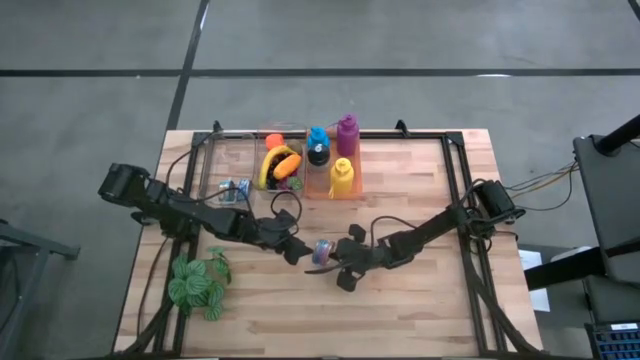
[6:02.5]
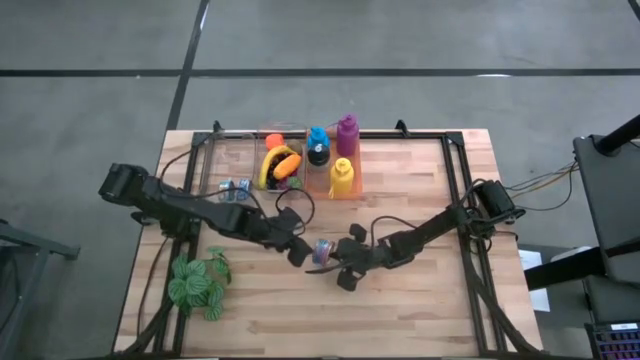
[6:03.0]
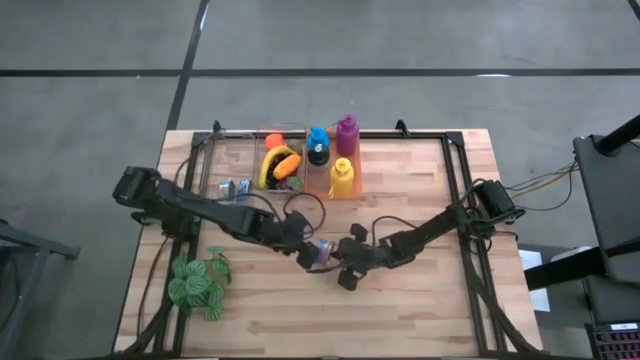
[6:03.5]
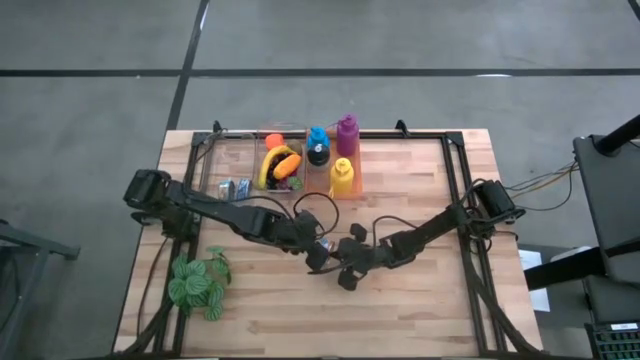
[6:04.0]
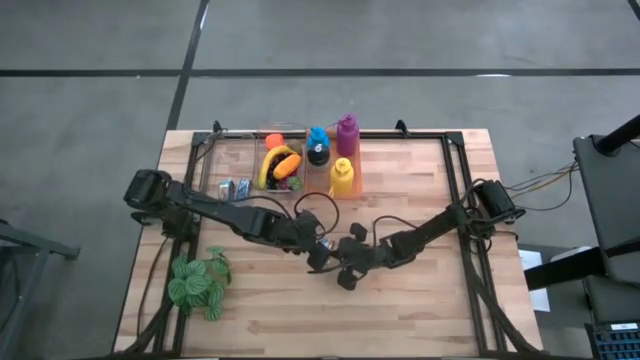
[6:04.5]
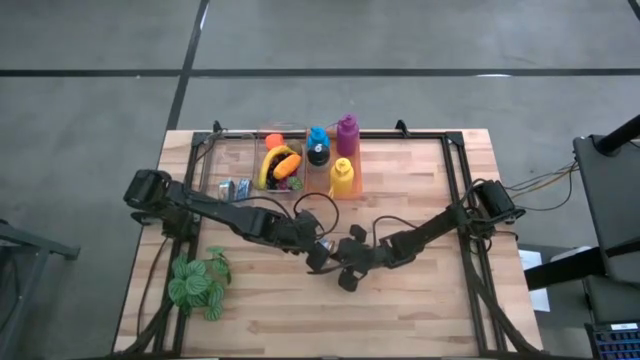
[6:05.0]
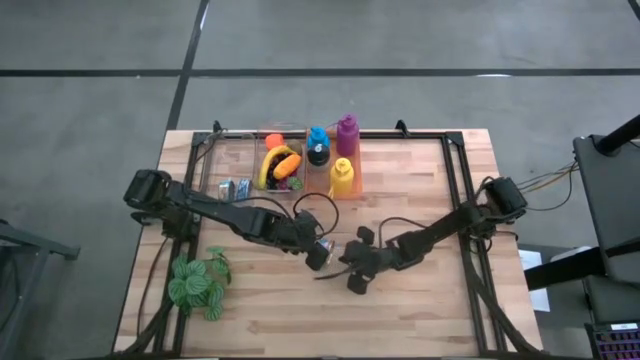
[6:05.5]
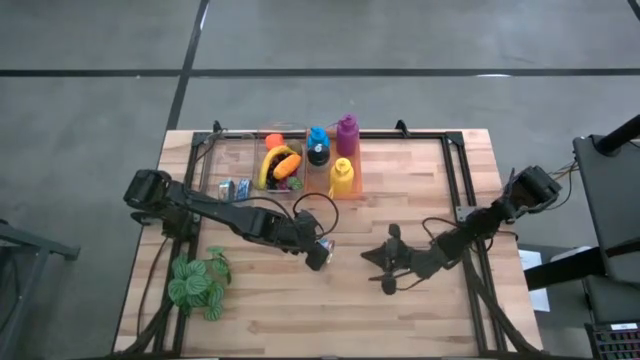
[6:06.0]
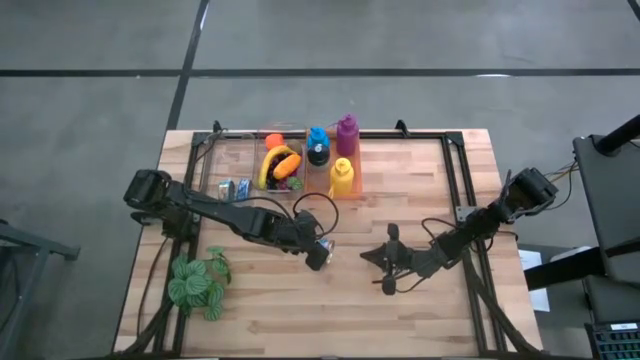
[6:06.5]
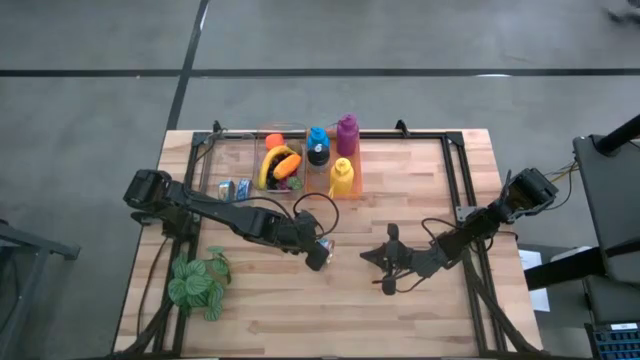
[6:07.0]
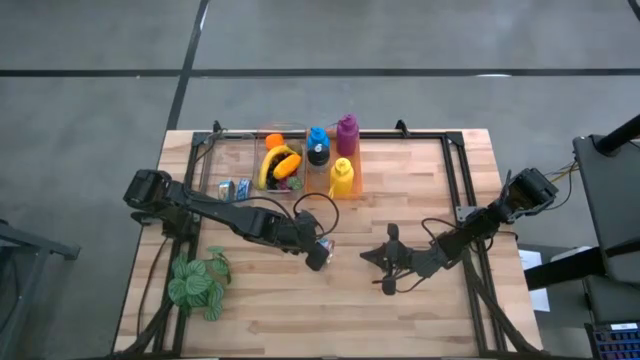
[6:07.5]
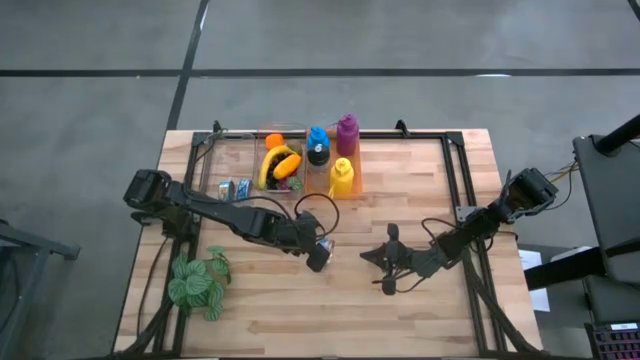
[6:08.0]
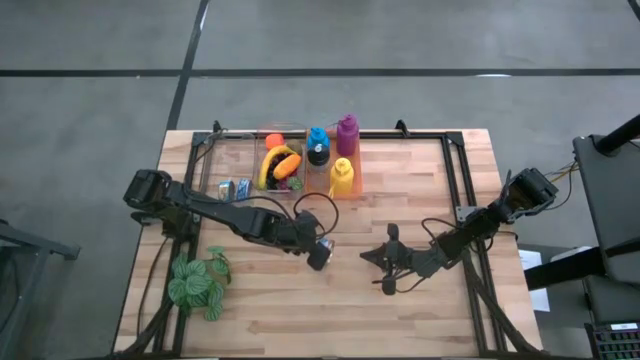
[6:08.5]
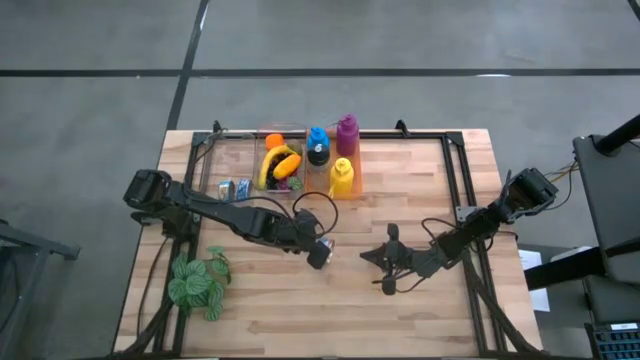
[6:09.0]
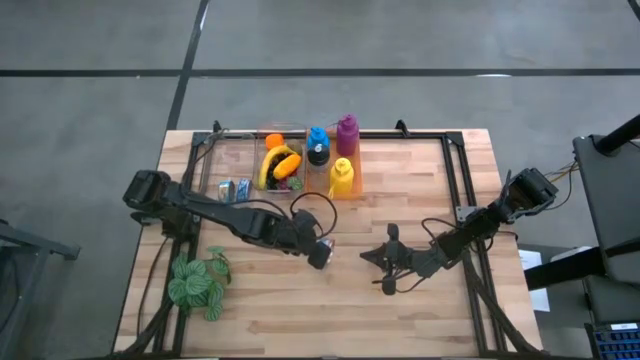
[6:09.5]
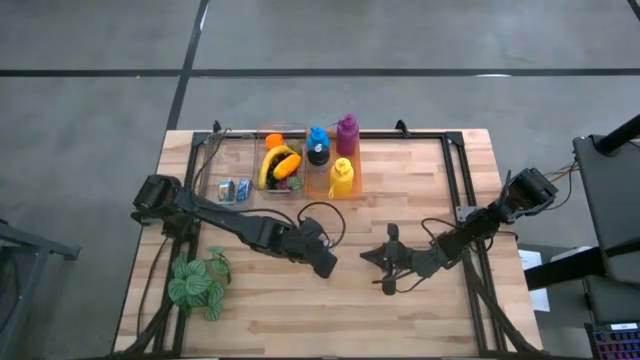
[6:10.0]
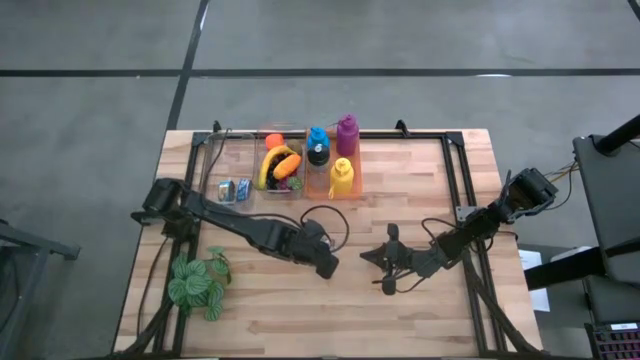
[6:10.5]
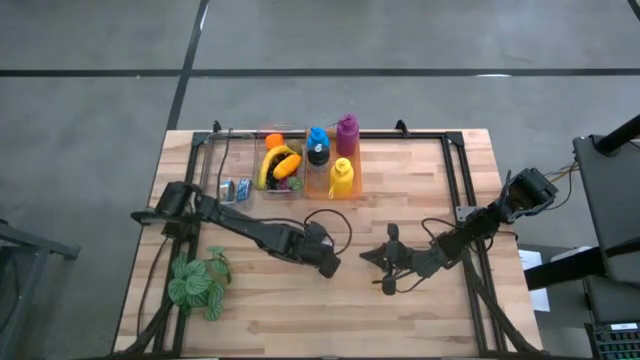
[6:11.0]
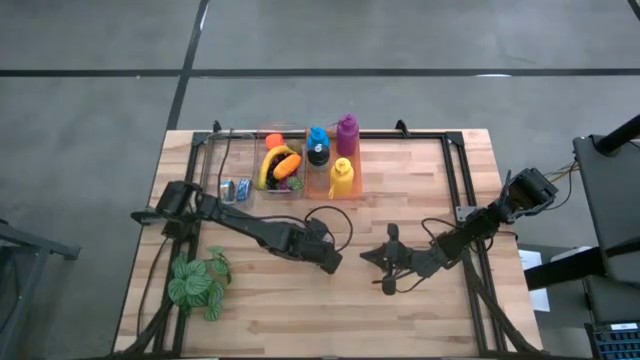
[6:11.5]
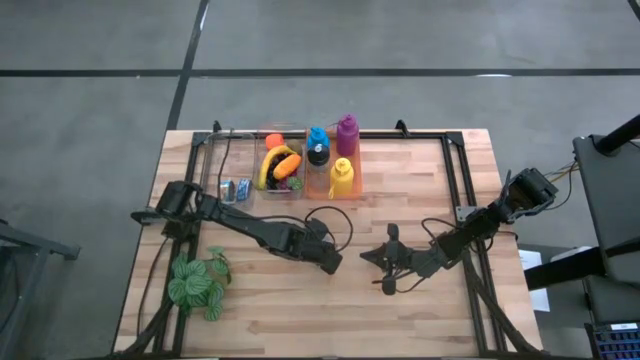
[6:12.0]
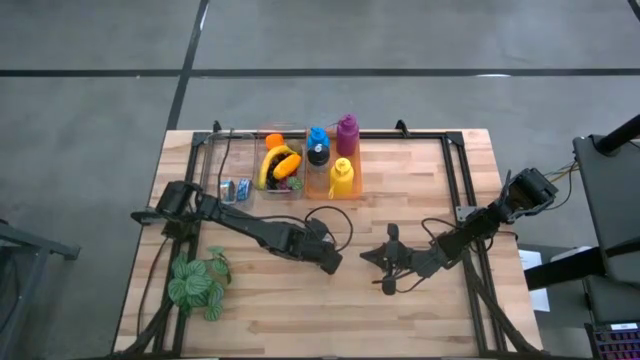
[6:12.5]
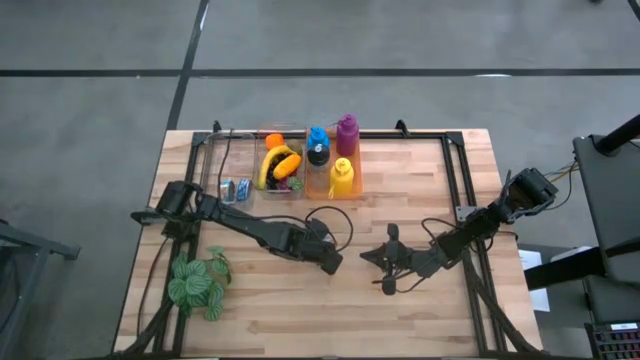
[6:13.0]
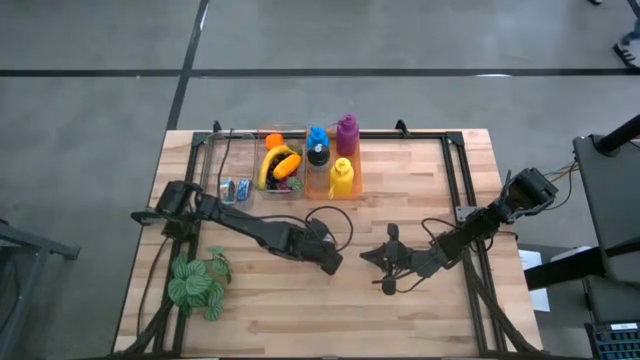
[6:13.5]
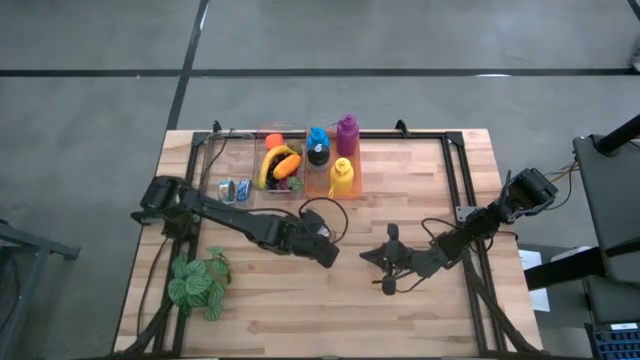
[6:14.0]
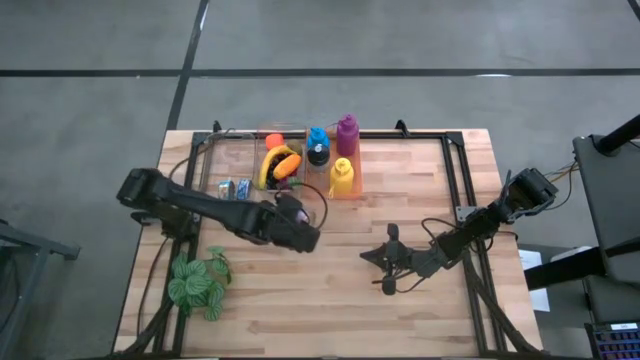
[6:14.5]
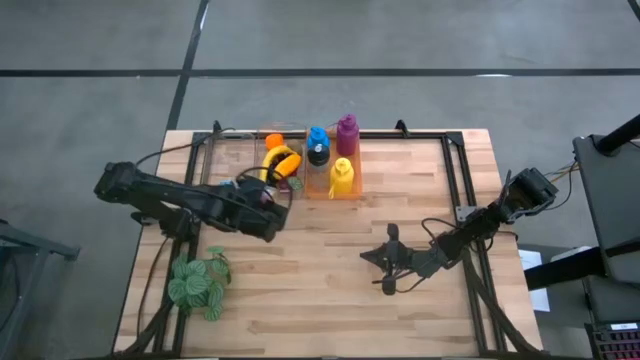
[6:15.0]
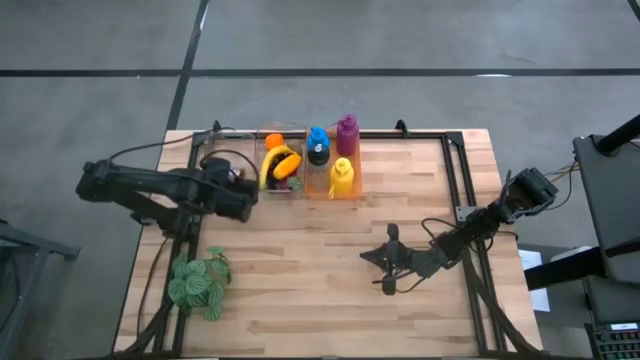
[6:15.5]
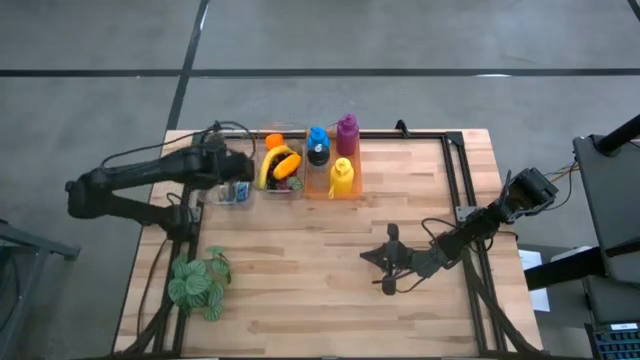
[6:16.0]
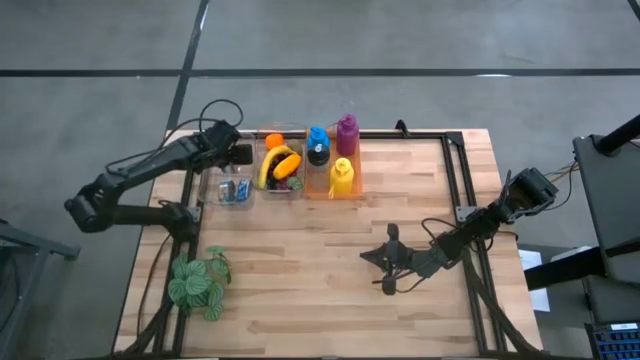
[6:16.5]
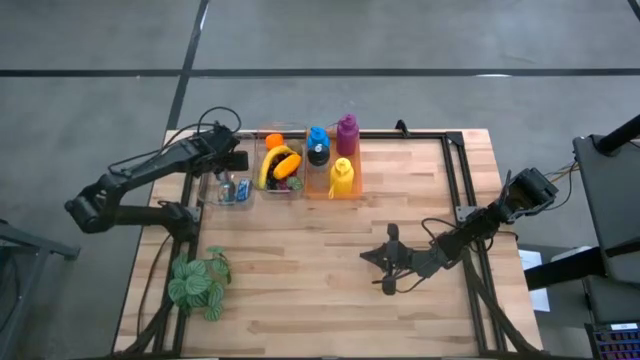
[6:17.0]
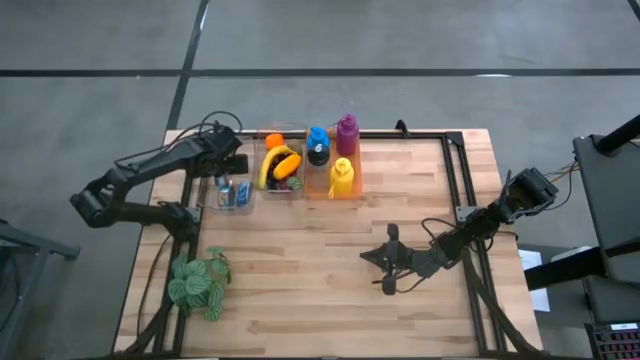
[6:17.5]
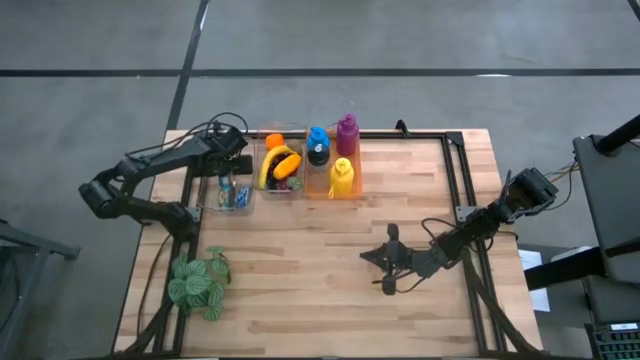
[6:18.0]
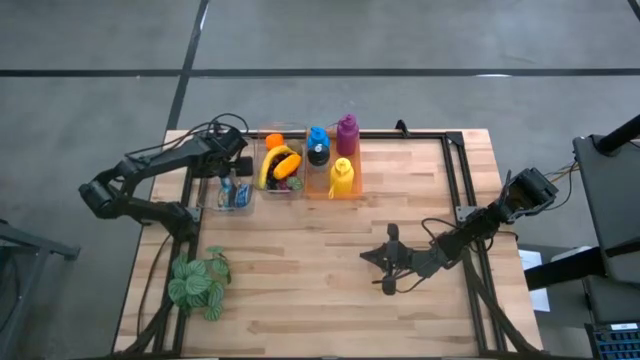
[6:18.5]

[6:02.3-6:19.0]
Task: Pick & Place Food Item
Put the blue pink tuna can into the left transparent bin
